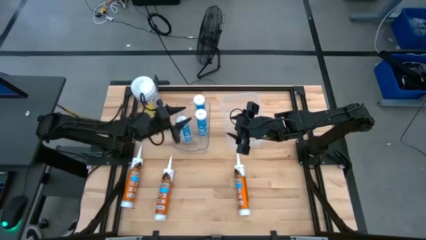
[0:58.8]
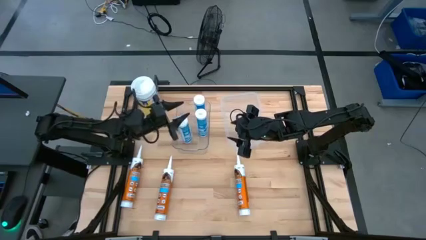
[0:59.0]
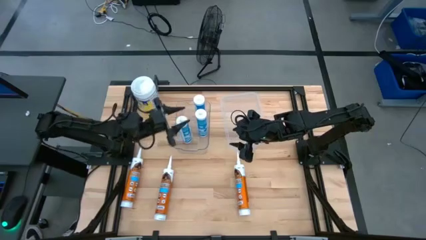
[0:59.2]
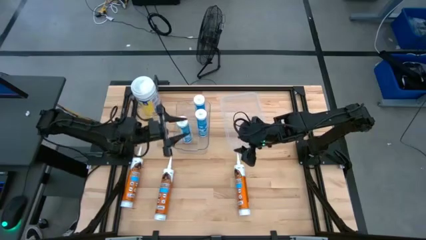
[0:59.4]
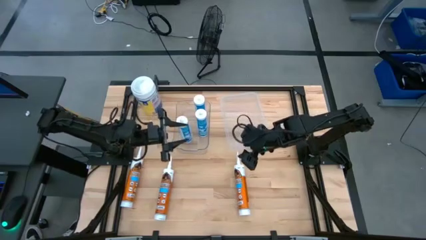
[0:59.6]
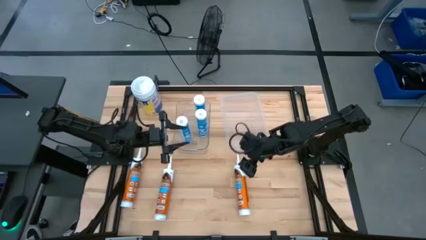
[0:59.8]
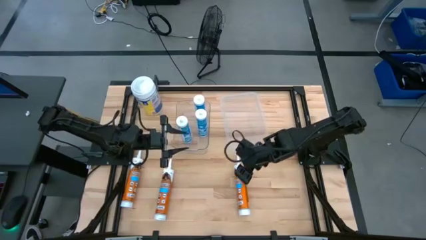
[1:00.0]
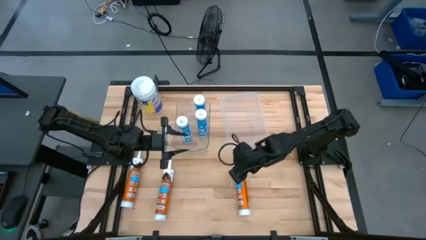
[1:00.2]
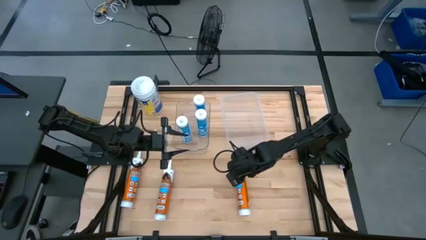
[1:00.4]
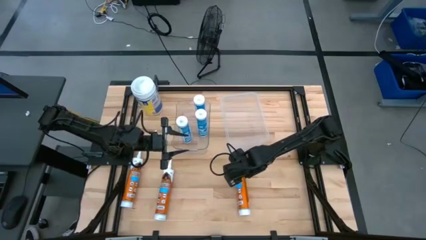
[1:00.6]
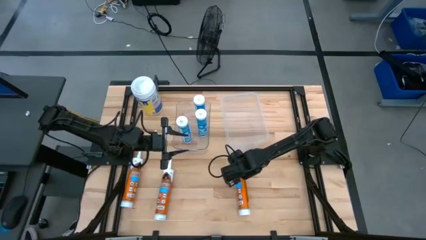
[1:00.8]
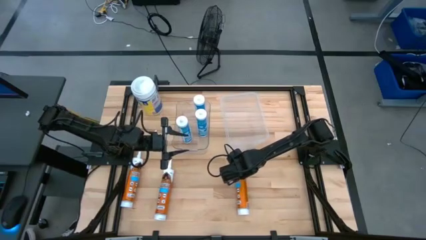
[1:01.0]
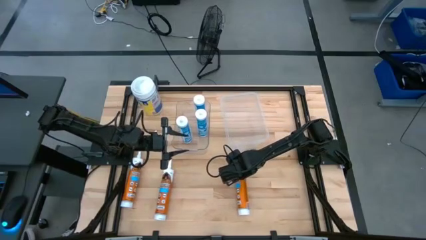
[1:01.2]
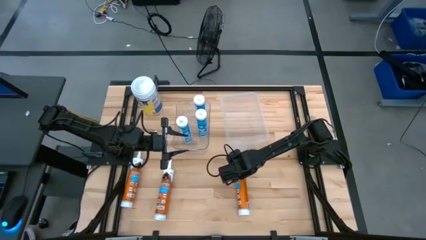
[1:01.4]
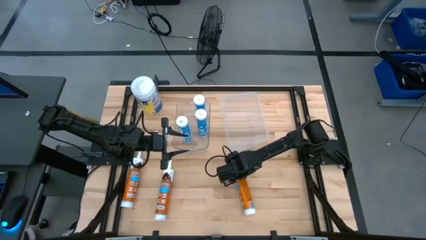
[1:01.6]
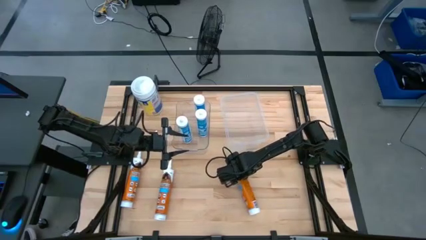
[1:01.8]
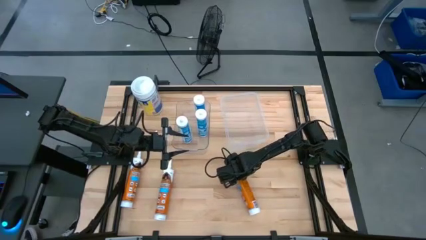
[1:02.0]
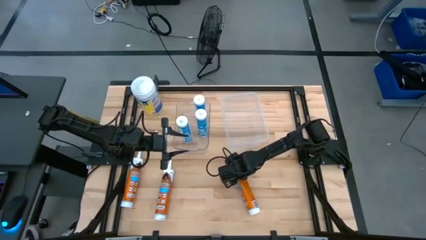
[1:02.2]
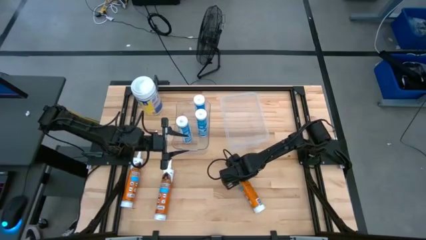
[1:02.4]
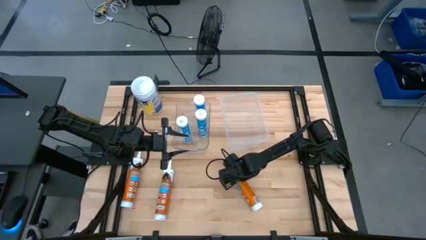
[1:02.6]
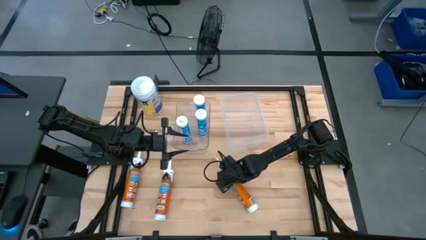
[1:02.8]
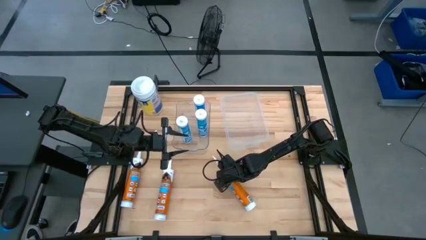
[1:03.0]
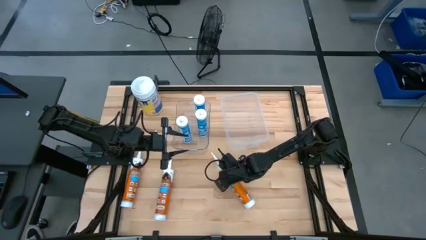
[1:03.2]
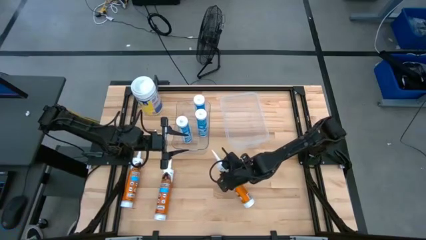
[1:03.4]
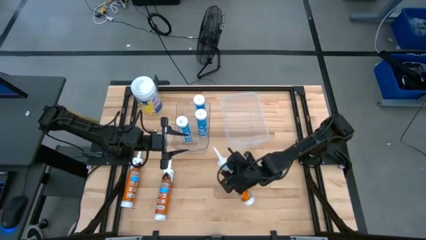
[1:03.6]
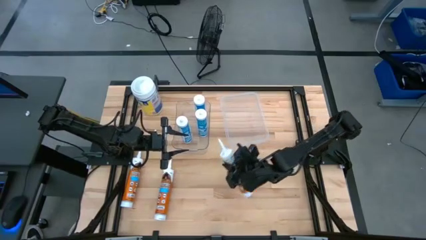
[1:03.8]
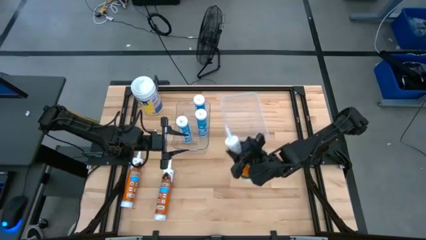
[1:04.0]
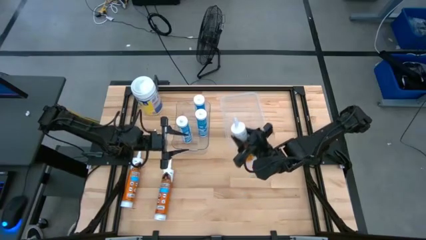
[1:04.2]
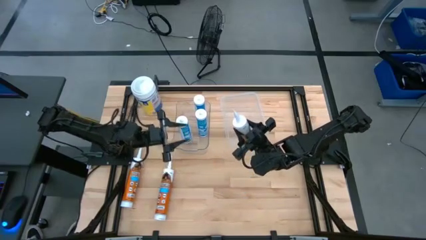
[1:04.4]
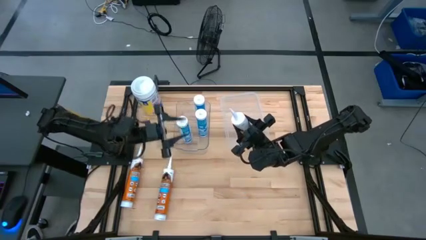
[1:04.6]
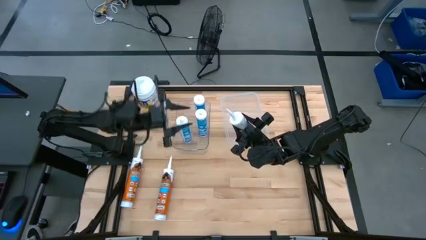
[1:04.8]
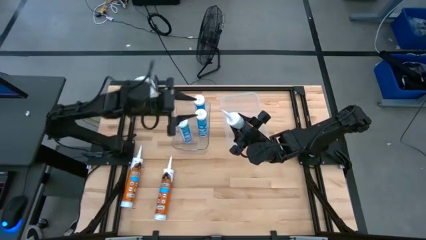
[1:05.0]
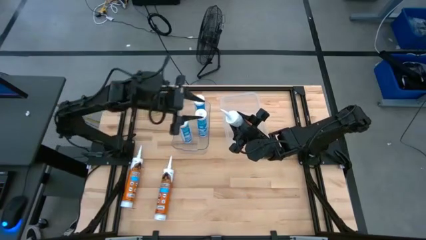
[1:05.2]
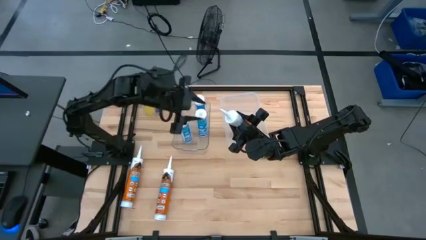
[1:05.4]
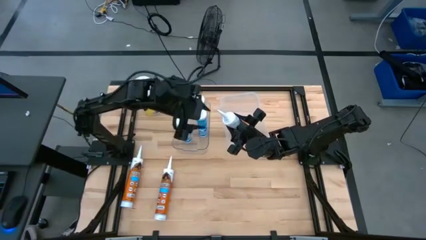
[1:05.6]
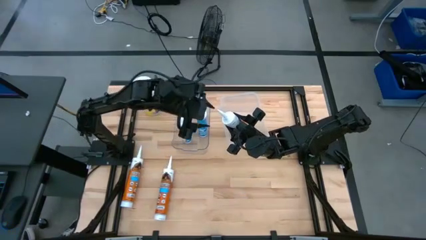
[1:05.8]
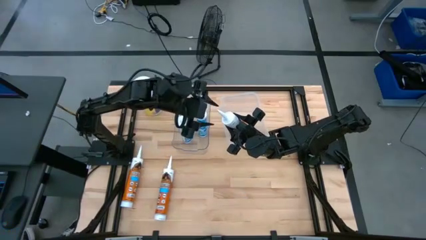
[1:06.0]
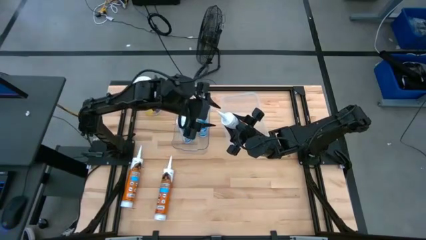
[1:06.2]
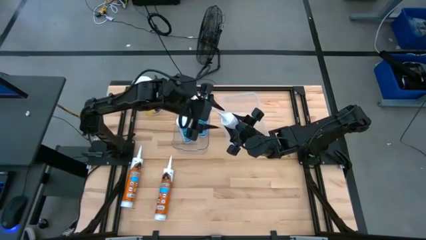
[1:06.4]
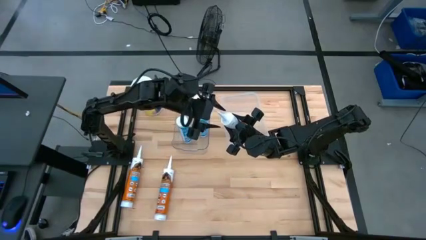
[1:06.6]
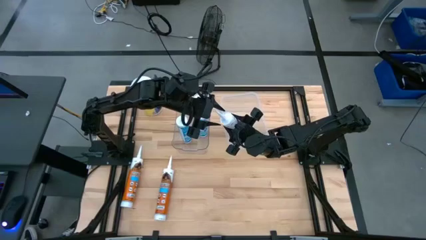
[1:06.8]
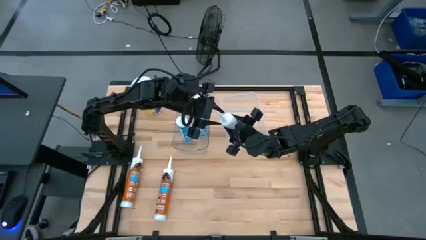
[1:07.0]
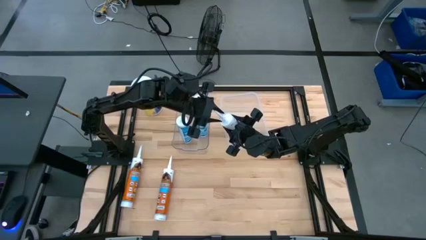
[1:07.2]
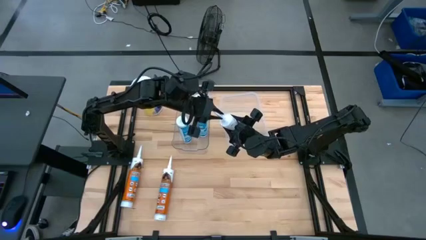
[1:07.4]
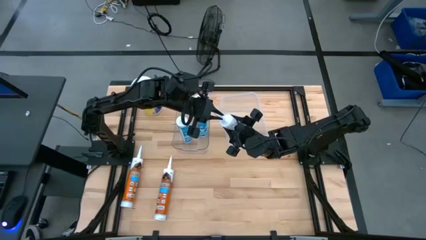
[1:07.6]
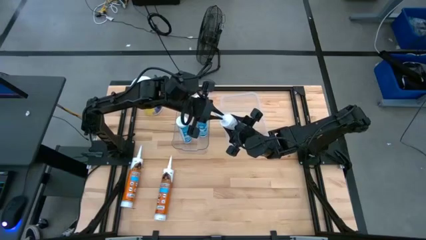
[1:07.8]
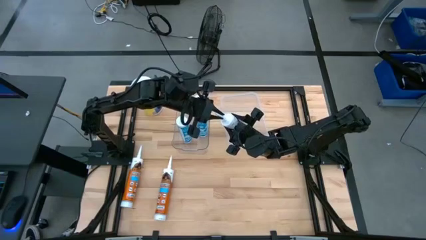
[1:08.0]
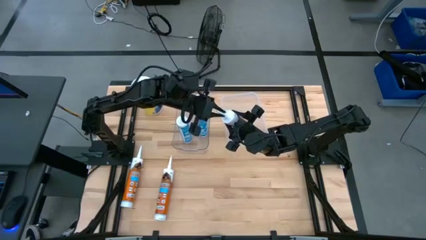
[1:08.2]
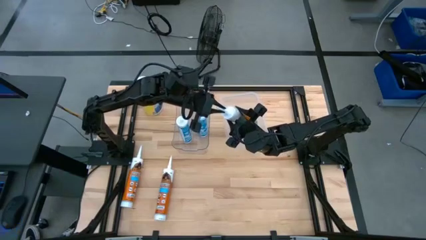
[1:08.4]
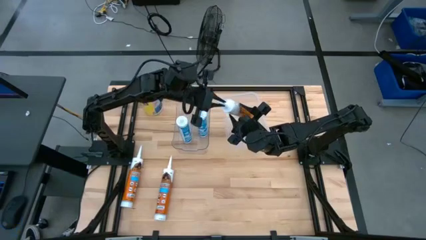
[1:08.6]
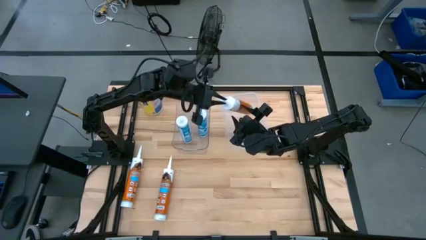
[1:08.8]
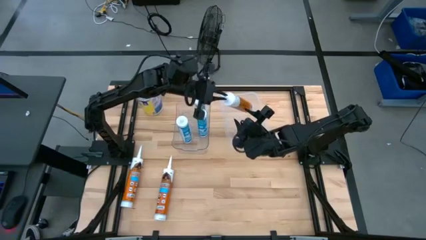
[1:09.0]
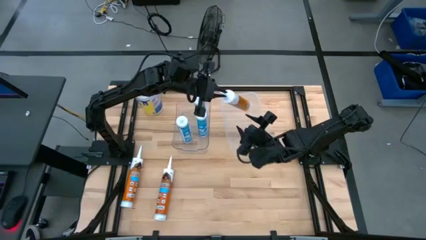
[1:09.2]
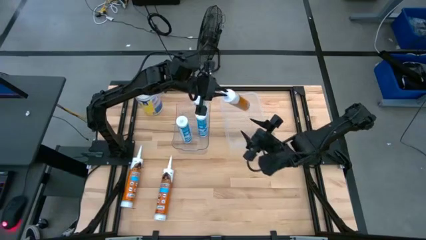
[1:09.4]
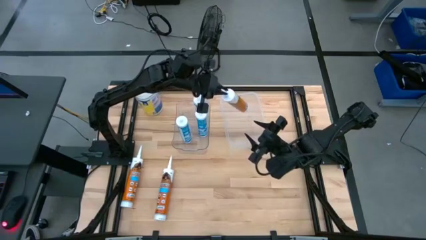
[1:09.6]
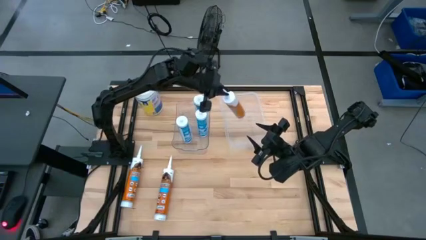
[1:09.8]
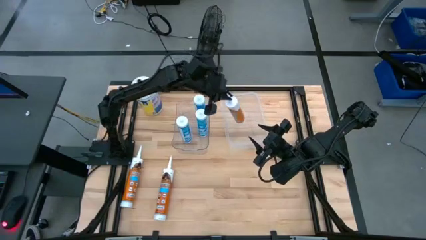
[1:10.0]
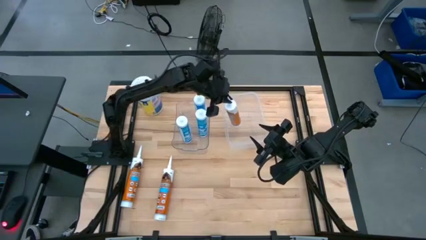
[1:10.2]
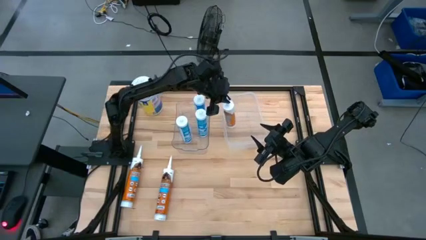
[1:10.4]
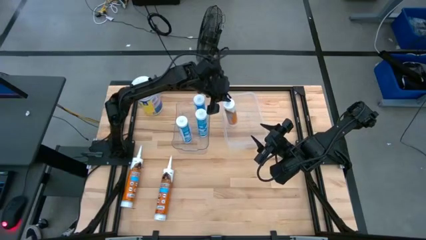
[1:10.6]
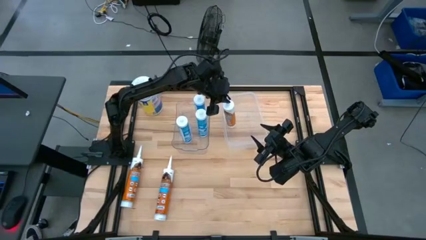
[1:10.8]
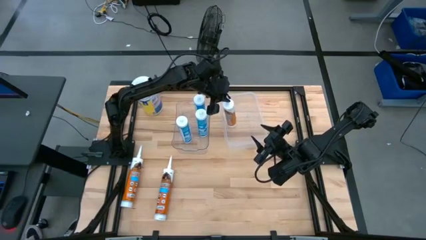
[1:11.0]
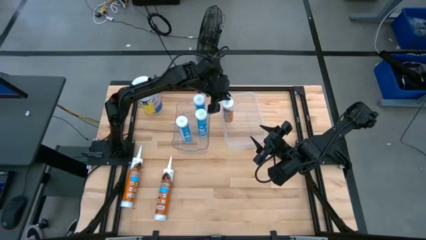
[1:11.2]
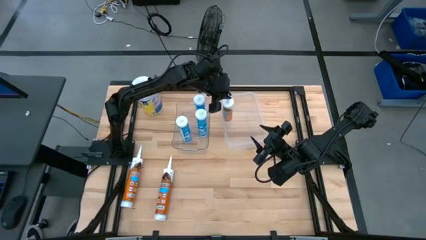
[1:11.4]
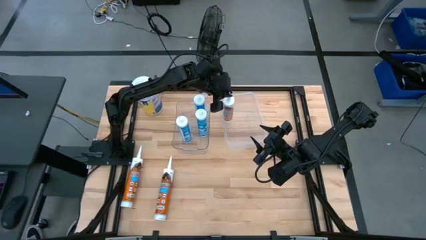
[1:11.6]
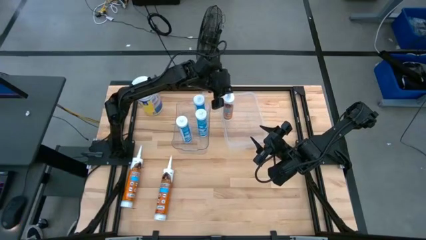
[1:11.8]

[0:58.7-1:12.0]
Task: Pick & place silicon tubes, Sealant and Lysol wipes
Put the right orange sealant into the right transparent bin

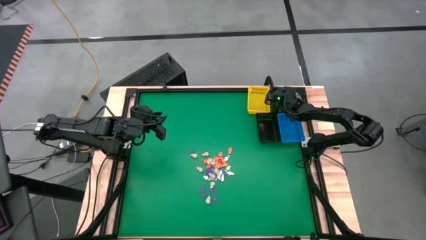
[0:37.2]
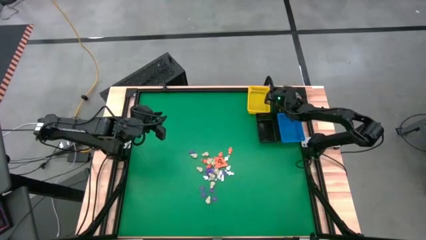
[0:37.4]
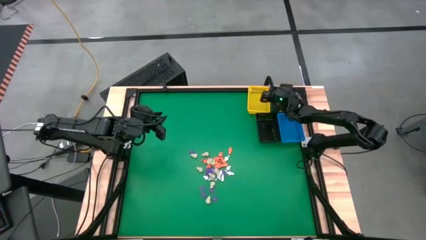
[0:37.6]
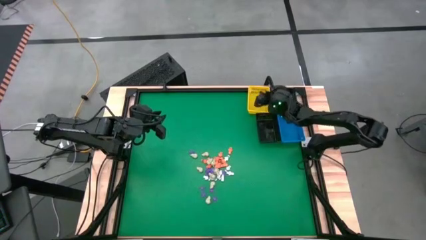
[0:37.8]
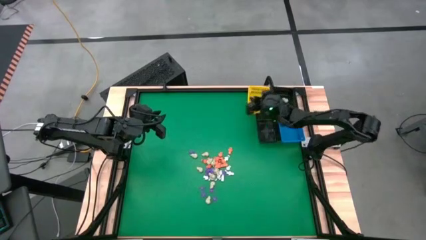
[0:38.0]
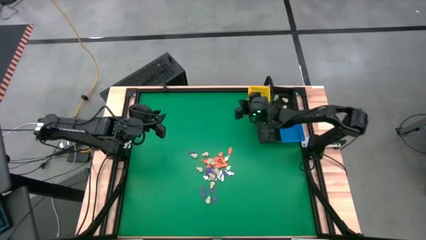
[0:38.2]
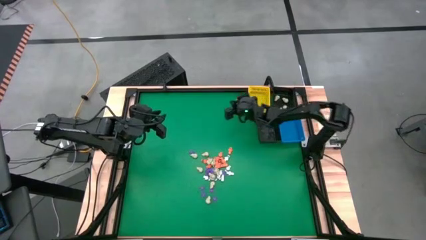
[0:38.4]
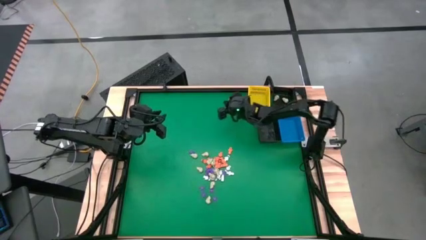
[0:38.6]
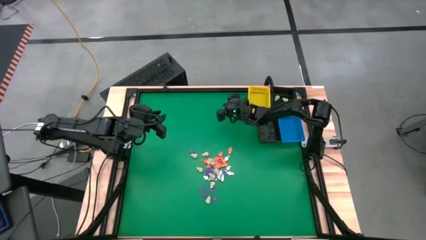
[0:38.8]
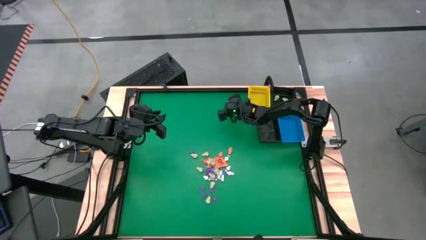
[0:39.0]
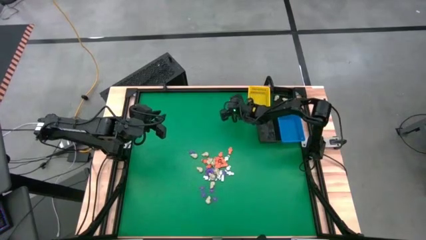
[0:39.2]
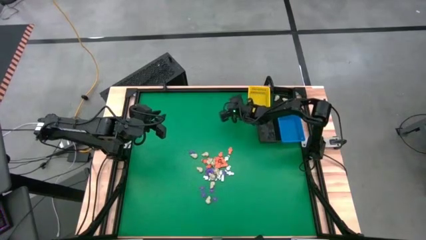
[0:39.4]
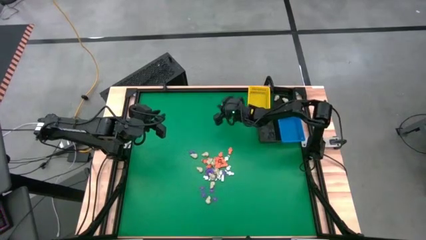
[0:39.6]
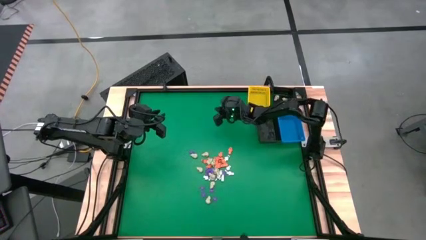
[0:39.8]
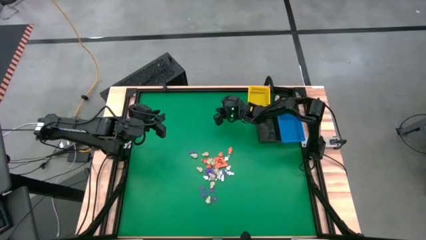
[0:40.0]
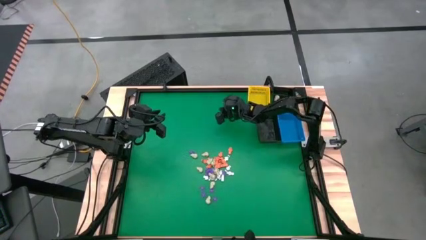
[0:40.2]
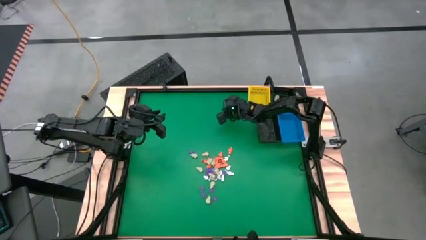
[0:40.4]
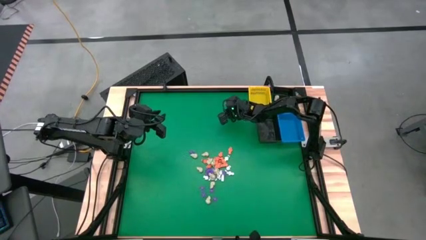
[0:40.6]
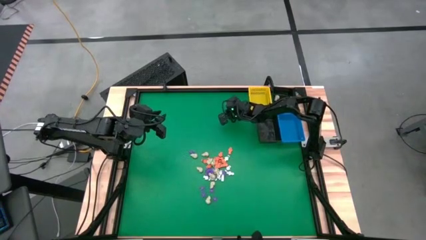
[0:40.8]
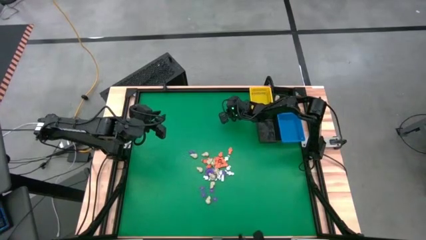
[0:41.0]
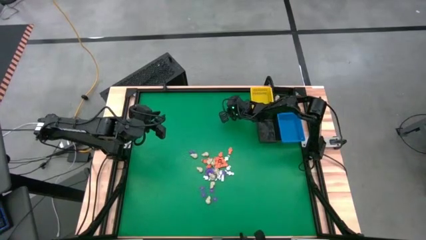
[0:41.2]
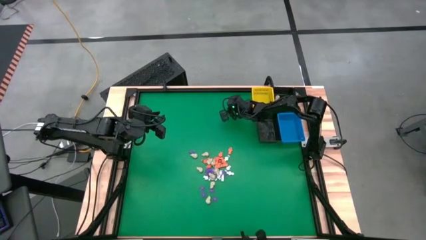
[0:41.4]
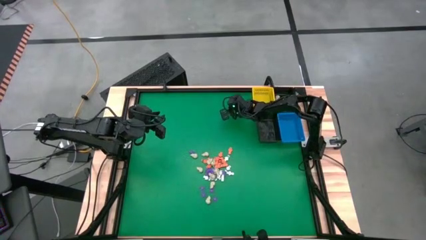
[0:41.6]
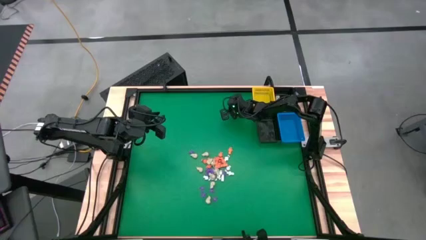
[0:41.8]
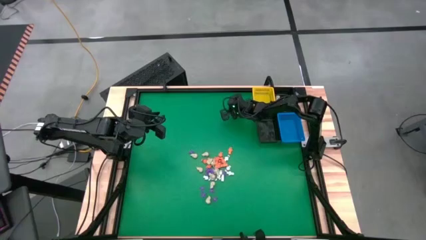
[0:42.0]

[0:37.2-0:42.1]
Task: Sort Halloween decoration
Adjust the yellow basket on the table
